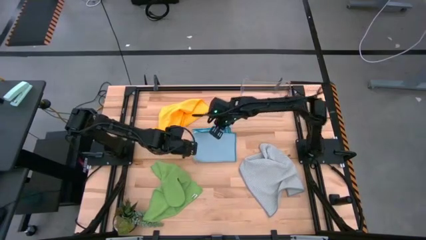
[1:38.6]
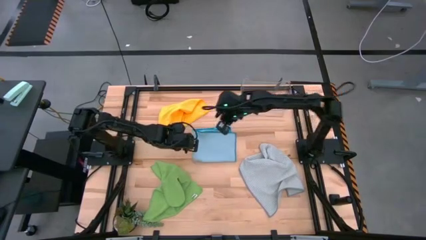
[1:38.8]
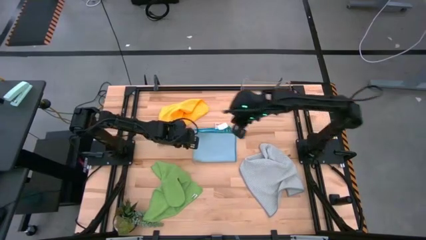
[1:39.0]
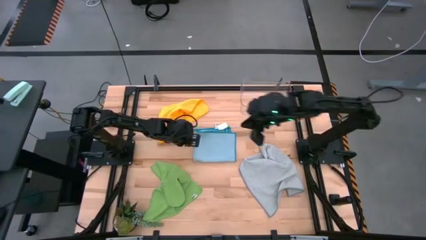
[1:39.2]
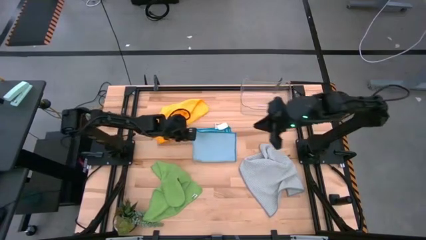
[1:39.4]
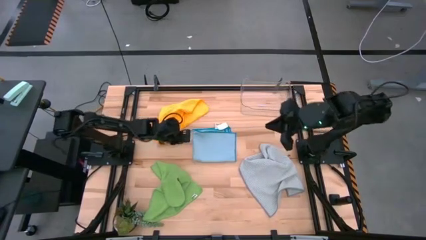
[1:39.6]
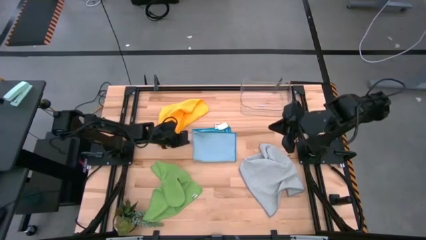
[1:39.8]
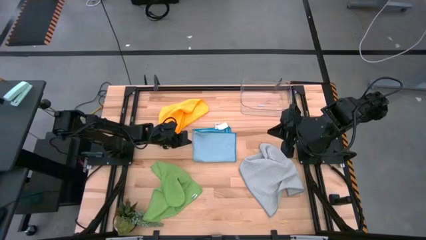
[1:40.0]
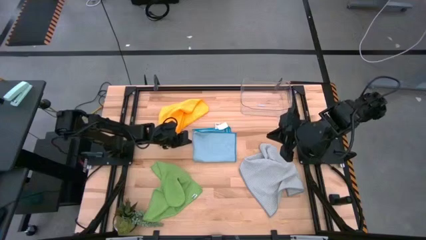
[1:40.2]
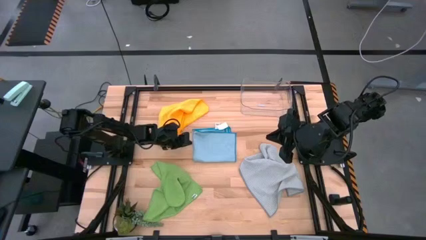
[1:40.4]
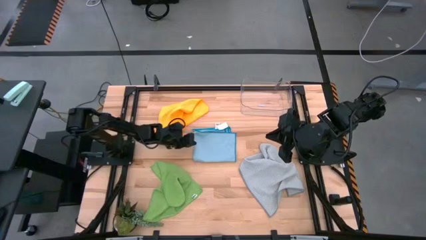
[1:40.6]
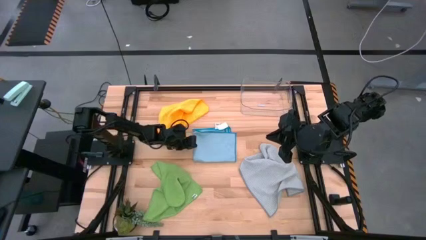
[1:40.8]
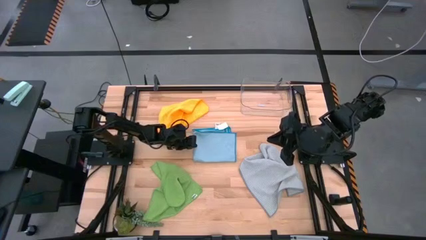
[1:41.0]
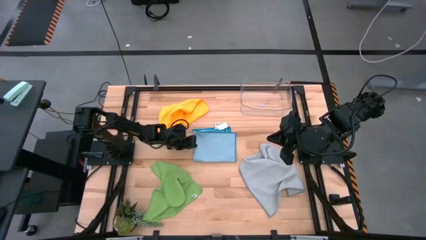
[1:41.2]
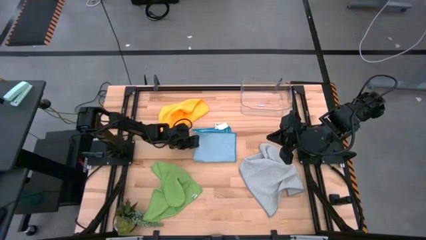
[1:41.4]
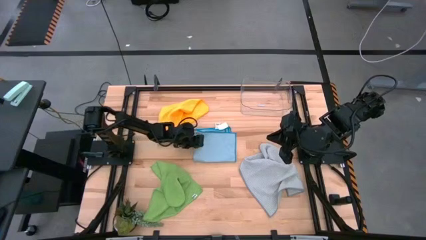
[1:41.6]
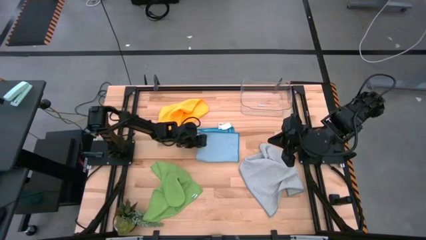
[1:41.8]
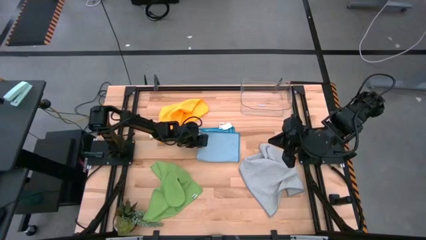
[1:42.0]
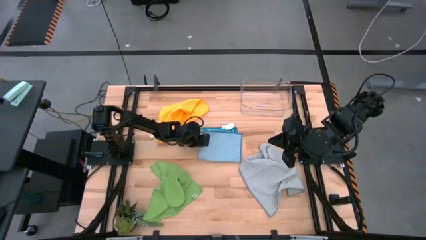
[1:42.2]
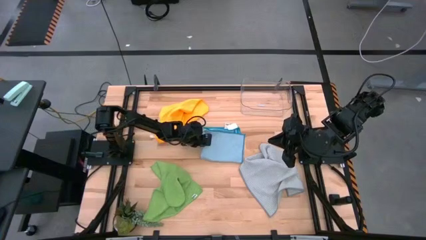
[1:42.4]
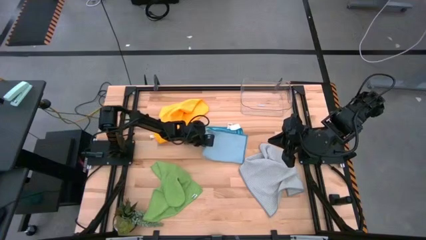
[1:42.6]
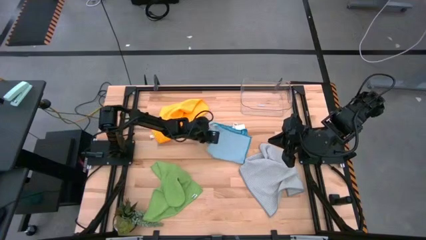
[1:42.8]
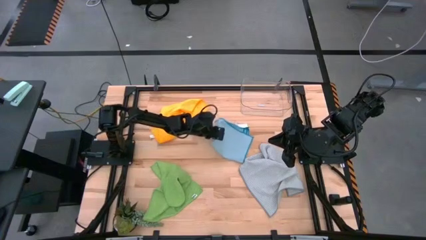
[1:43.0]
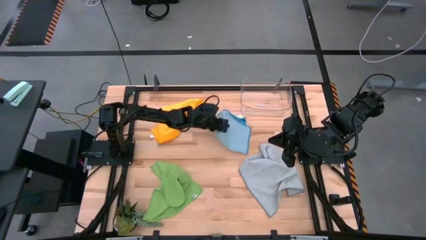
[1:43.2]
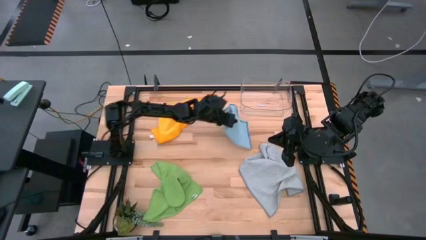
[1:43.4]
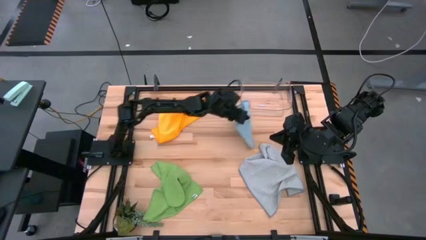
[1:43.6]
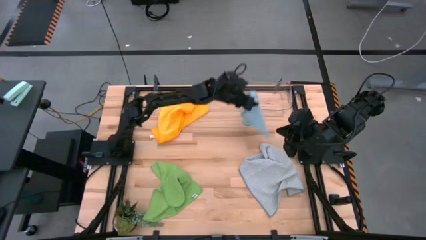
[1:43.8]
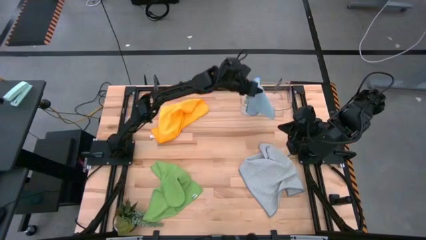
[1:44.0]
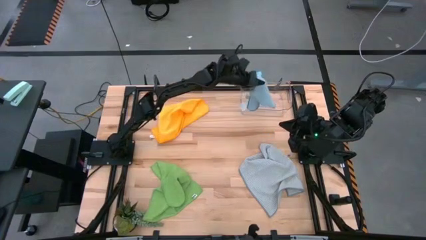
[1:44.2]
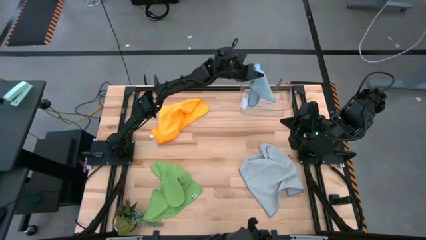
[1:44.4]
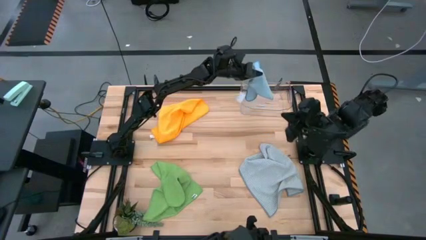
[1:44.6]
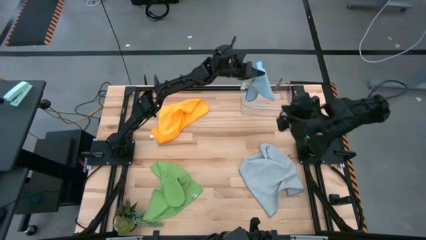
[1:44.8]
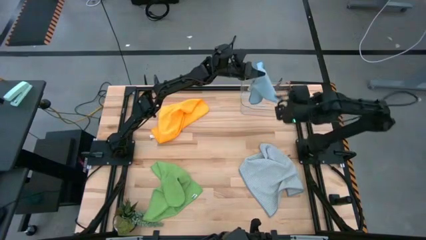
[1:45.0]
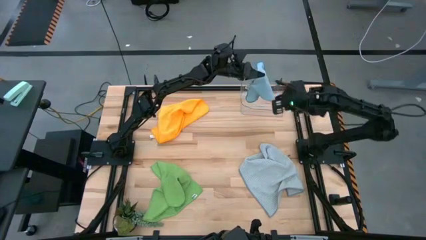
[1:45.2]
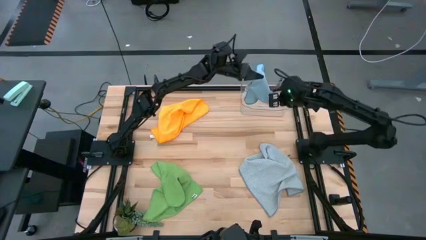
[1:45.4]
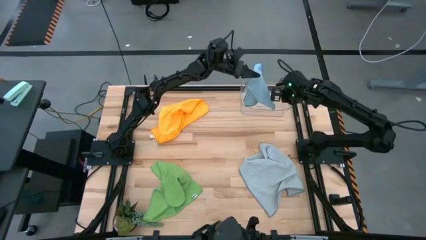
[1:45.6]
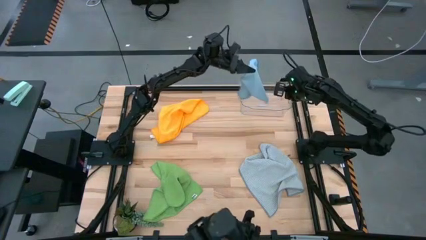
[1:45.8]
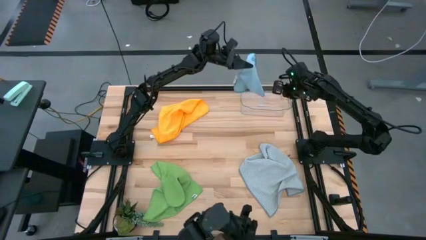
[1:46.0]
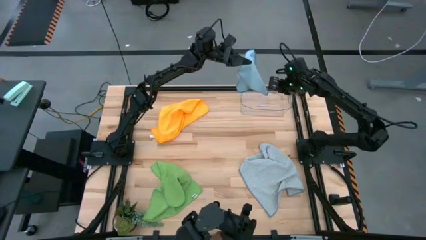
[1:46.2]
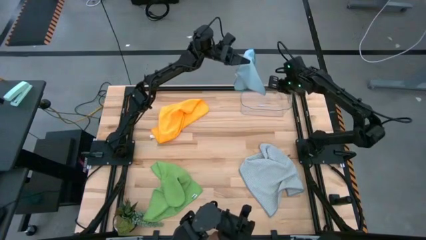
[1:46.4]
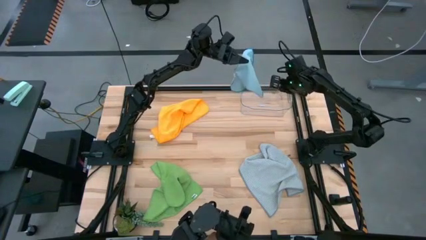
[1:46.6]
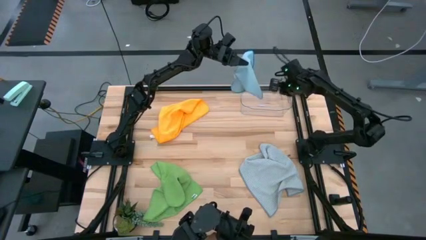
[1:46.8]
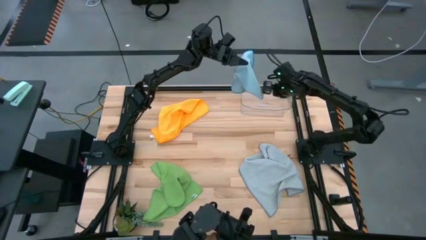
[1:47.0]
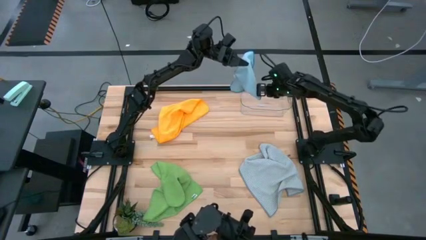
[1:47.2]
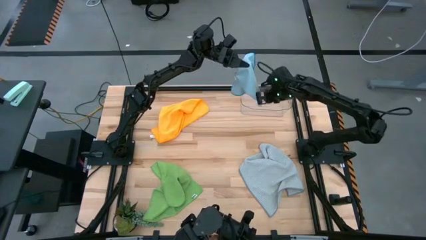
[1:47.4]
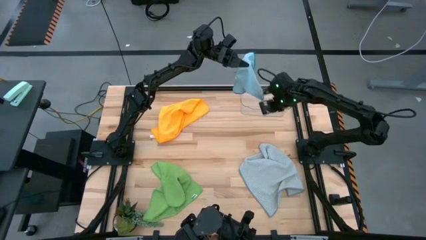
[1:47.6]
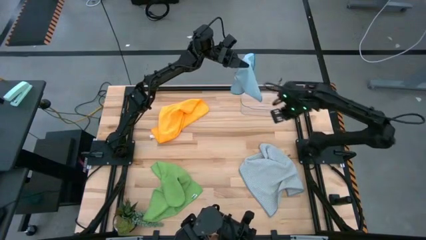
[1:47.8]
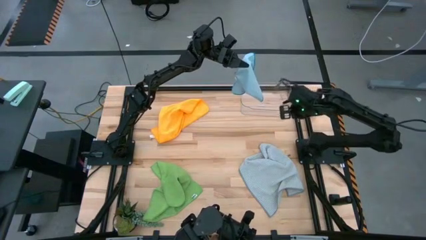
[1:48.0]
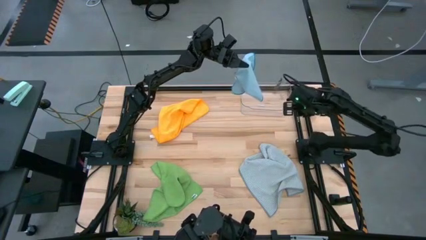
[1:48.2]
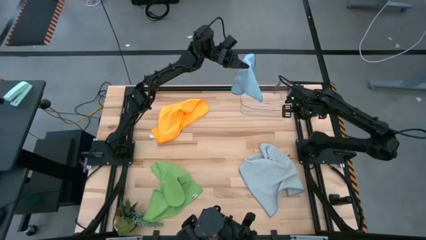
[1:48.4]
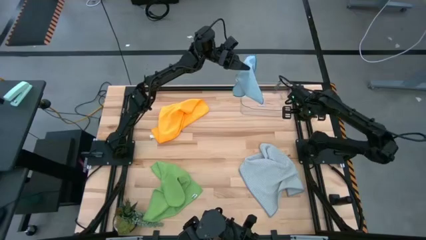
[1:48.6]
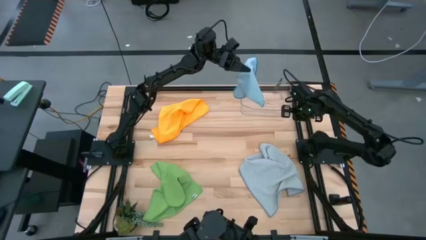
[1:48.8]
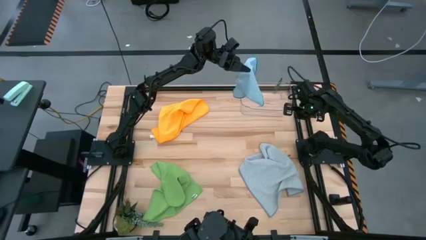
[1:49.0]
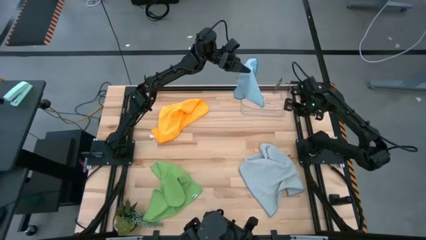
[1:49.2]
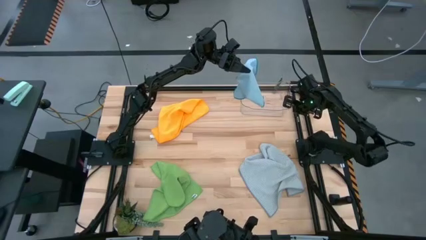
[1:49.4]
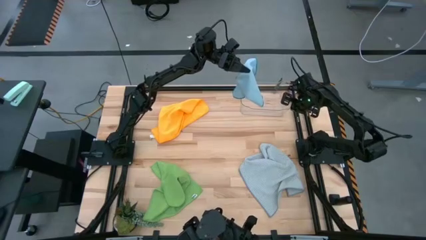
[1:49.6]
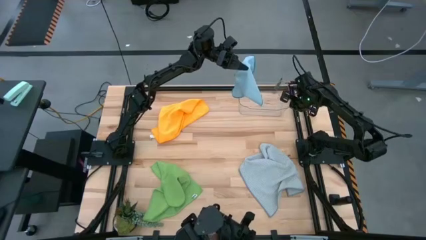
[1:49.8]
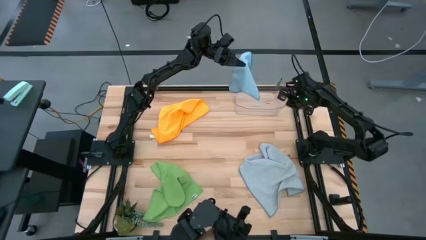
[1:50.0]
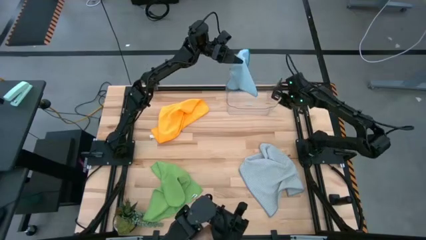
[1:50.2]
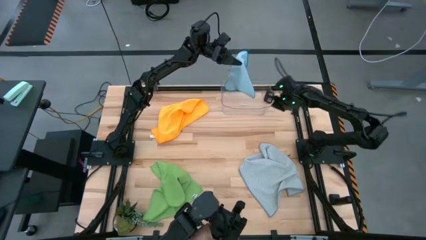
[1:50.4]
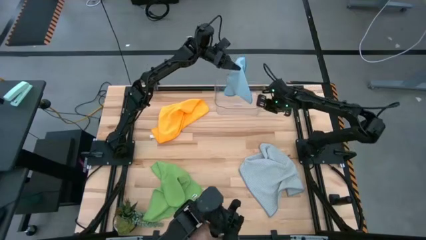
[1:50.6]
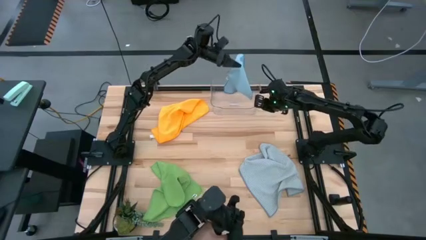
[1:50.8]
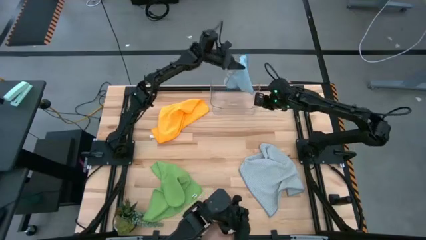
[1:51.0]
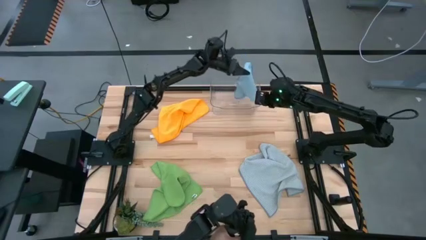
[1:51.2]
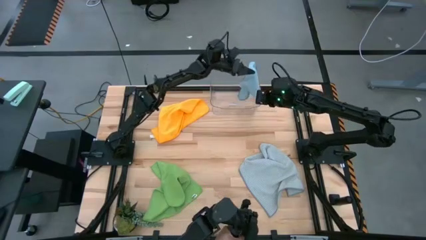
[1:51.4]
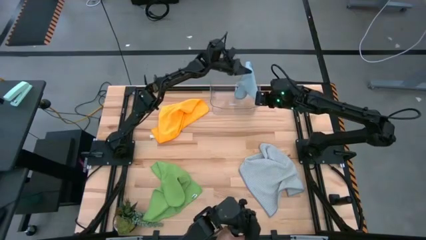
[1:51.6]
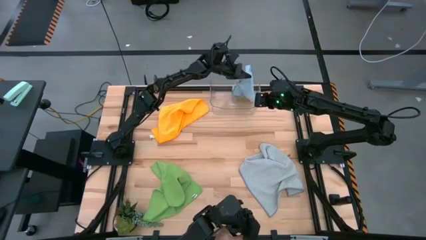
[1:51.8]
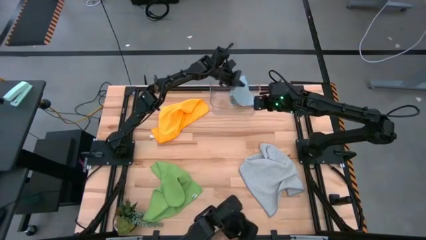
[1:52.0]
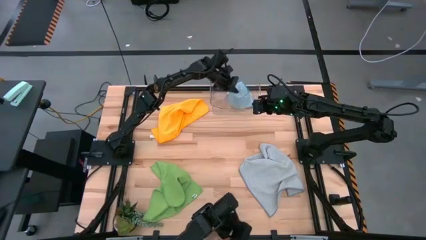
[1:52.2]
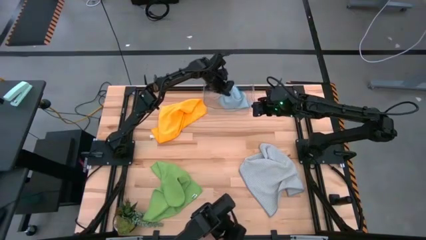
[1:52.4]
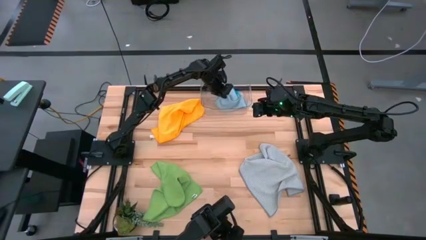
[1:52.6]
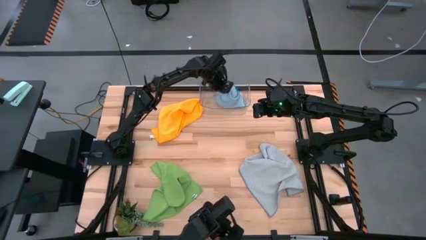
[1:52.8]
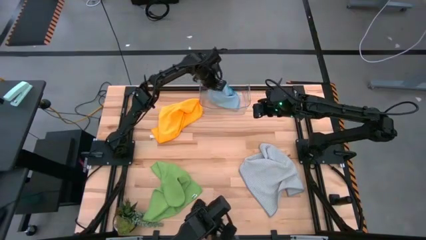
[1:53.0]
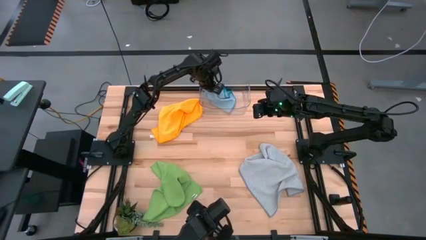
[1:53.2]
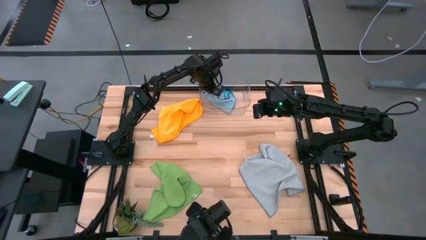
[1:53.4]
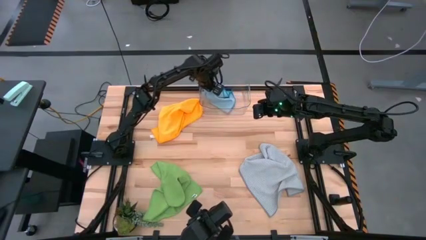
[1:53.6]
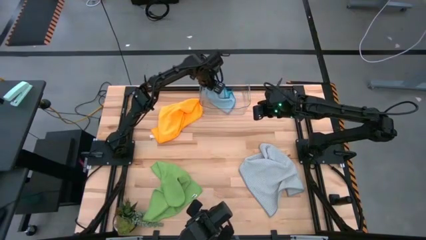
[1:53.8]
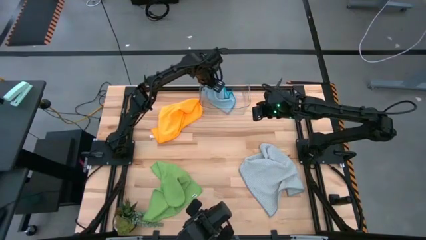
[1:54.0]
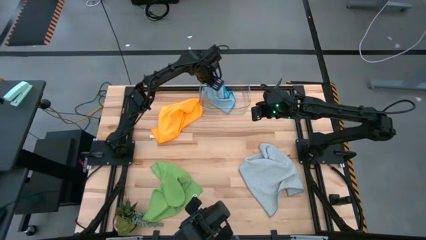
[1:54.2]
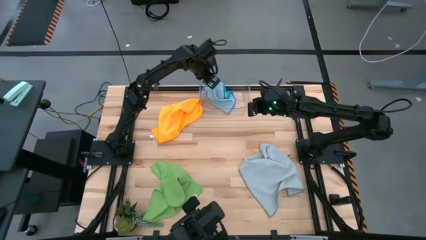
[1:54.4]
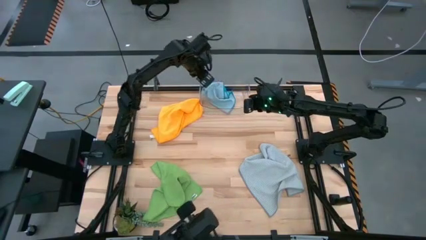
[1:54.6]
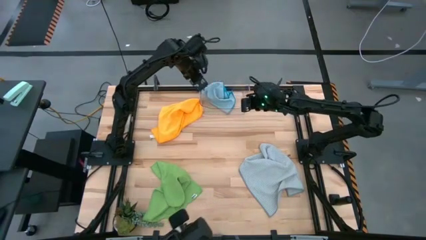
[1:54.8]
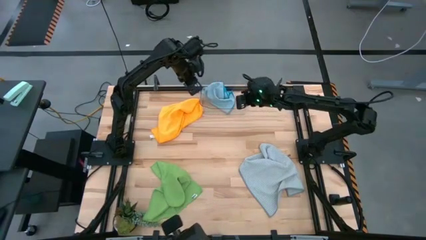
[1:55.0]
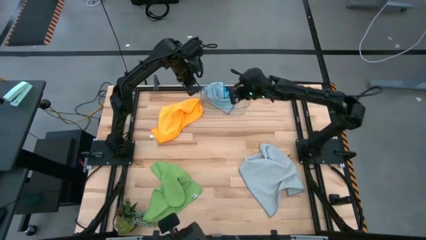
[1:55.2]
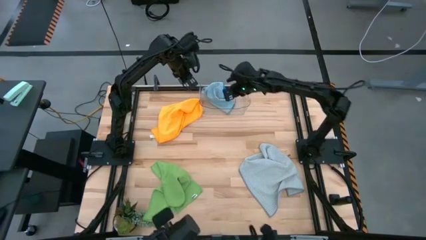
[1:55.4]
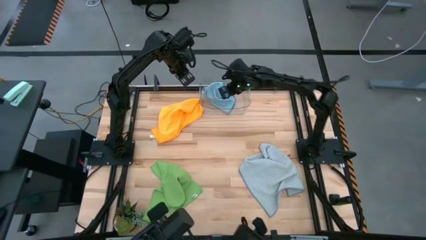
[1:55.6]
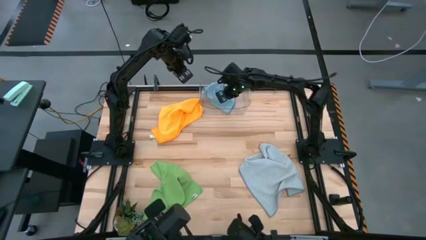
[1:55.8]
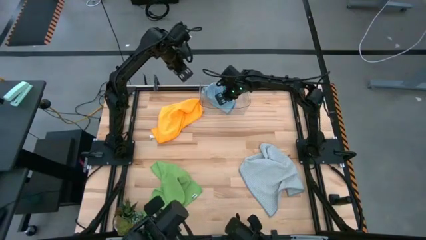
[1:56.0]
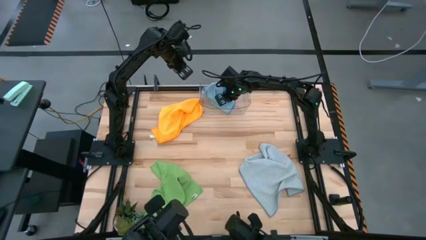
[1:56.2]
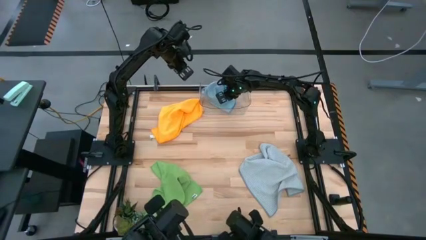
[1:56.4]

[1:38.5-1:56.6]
Task: Fold microfiber towels
Put the blue microfiber cloth into the transparent bin
